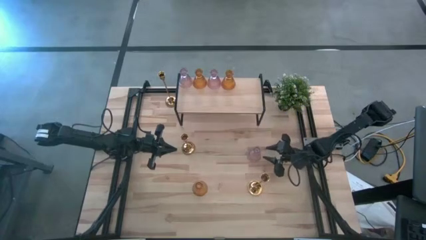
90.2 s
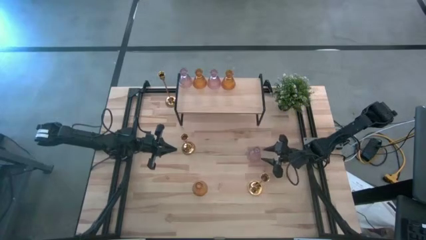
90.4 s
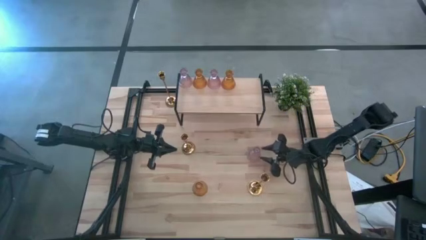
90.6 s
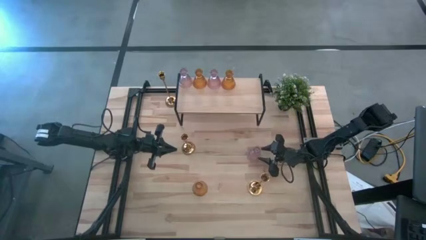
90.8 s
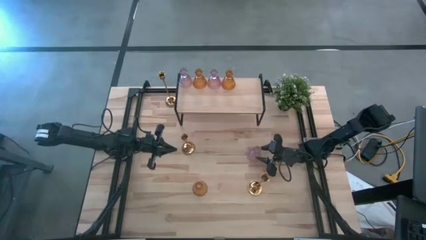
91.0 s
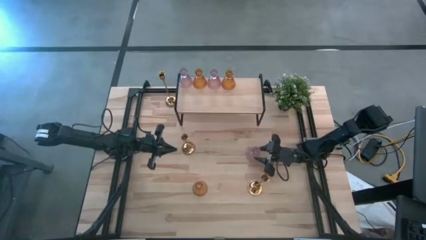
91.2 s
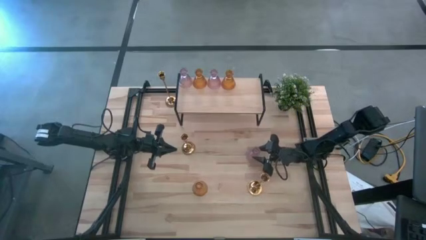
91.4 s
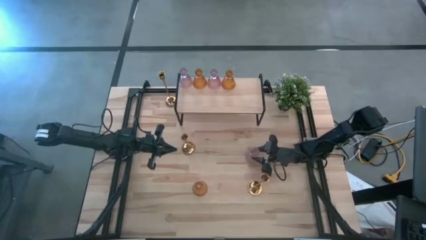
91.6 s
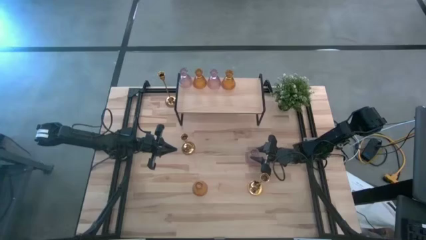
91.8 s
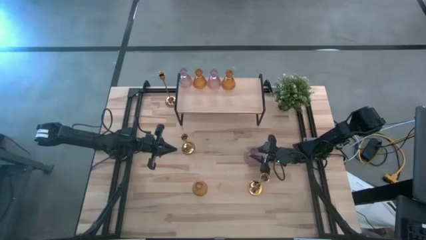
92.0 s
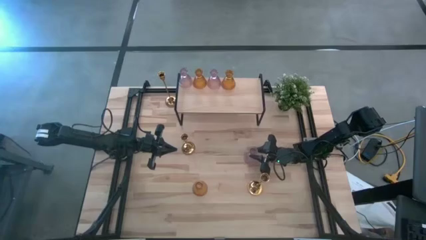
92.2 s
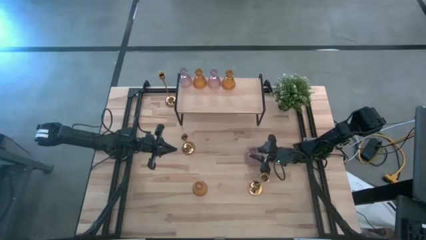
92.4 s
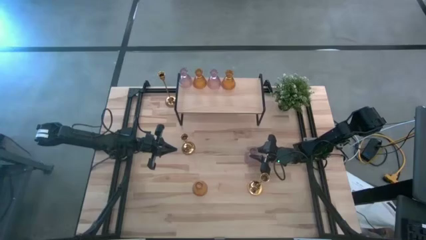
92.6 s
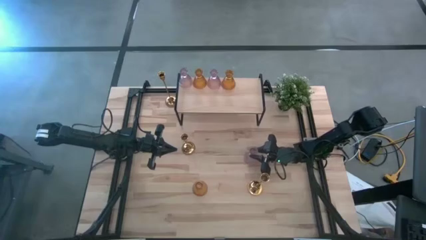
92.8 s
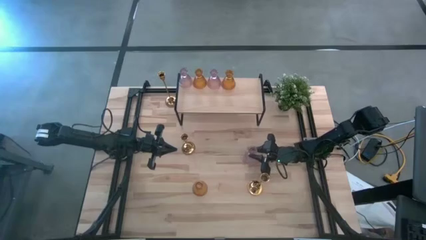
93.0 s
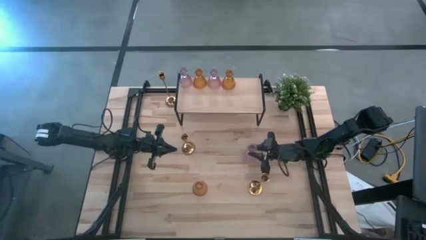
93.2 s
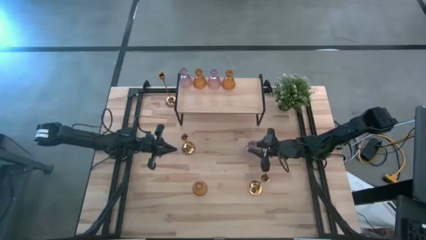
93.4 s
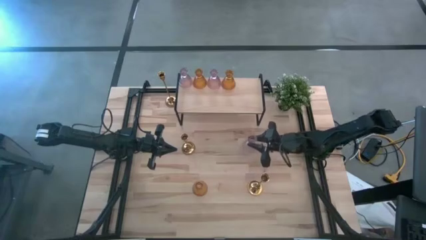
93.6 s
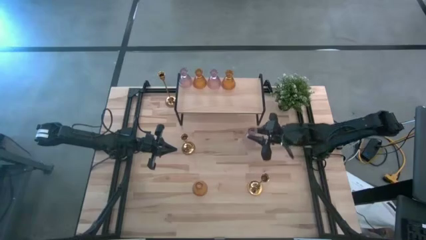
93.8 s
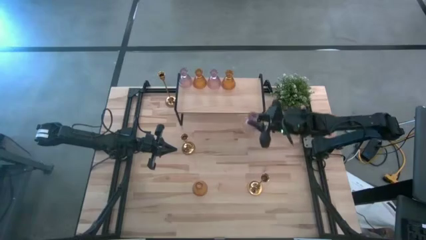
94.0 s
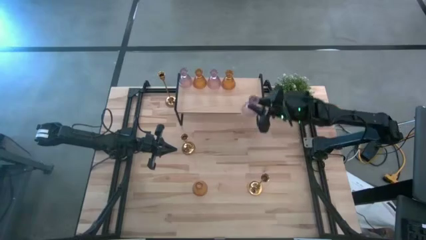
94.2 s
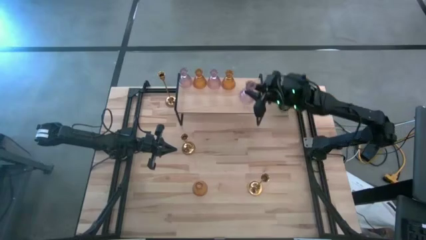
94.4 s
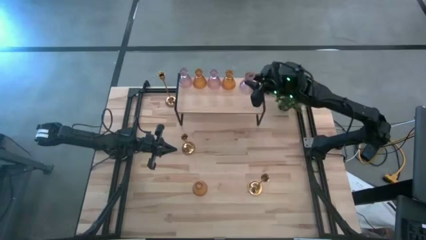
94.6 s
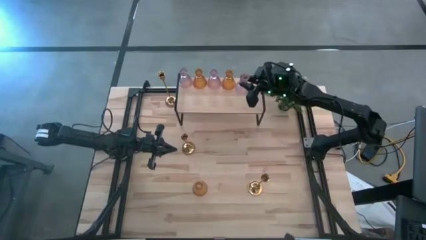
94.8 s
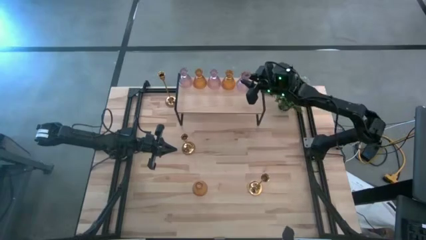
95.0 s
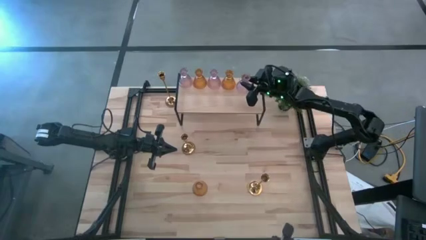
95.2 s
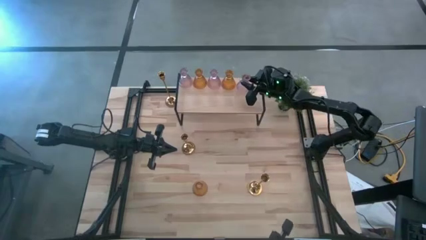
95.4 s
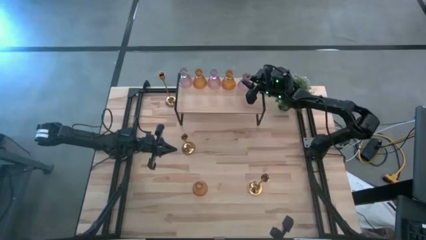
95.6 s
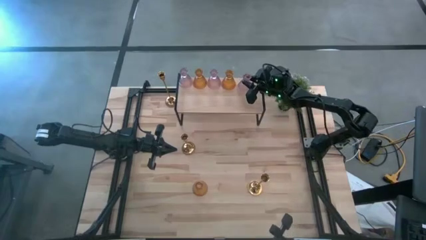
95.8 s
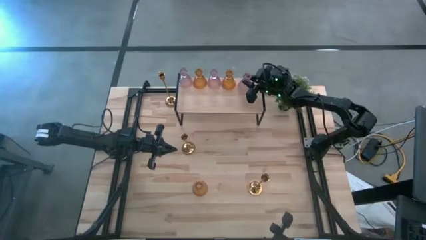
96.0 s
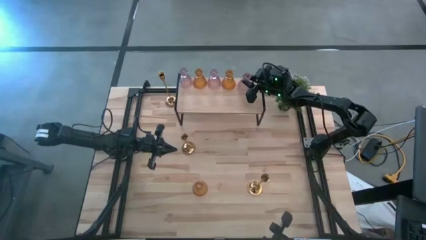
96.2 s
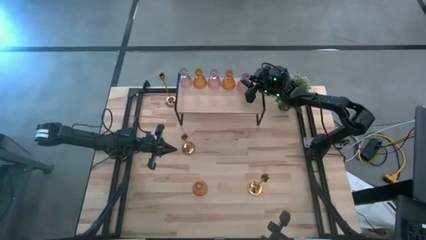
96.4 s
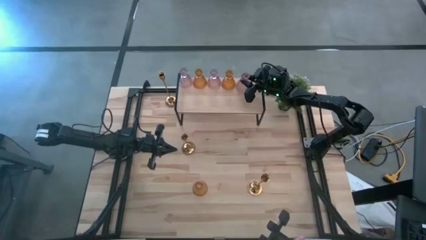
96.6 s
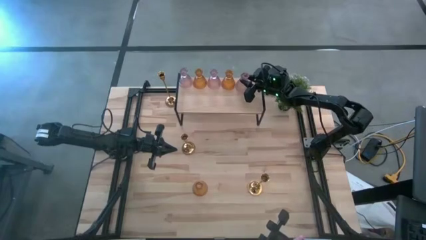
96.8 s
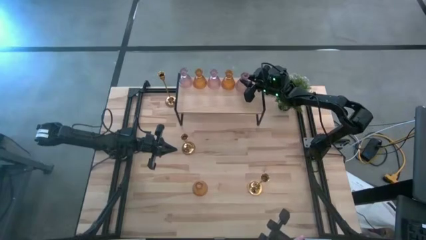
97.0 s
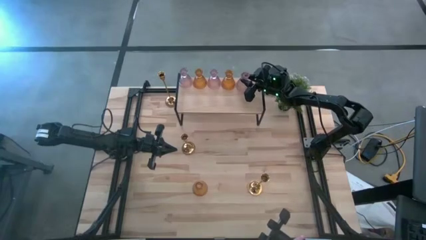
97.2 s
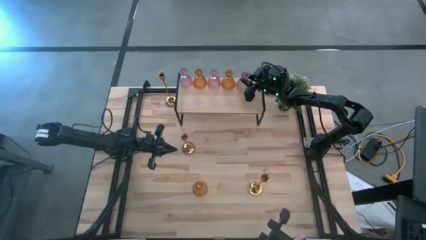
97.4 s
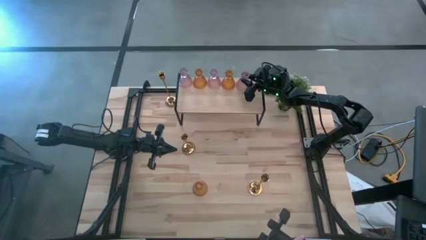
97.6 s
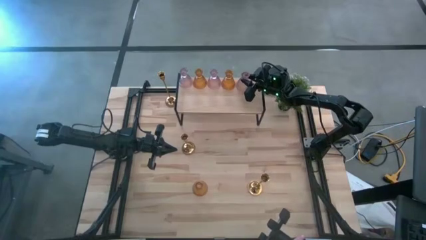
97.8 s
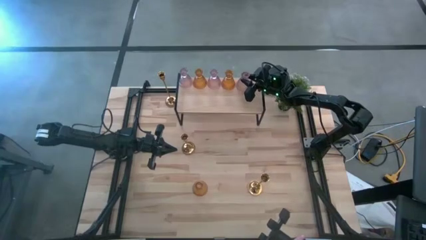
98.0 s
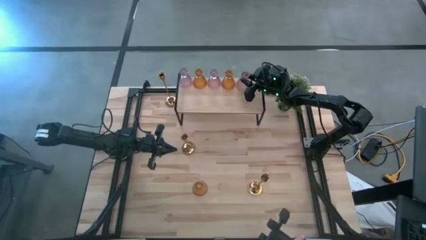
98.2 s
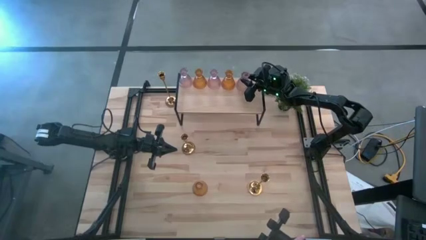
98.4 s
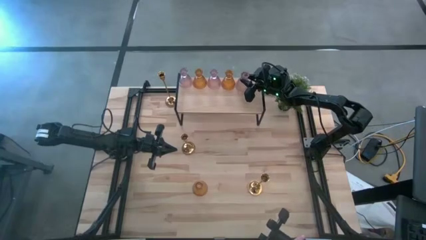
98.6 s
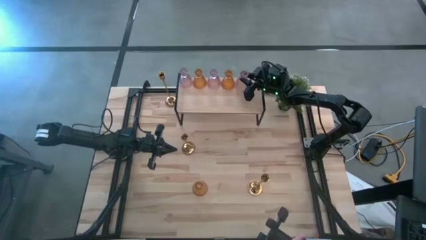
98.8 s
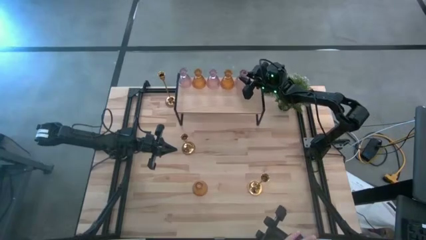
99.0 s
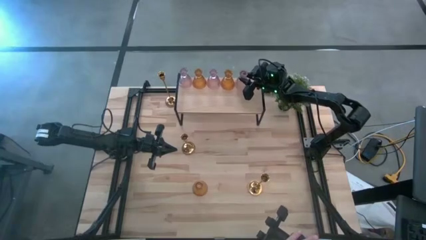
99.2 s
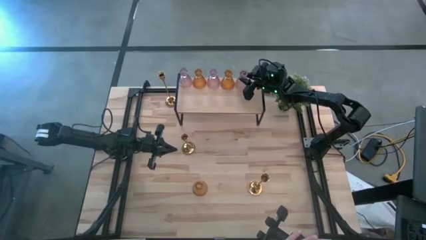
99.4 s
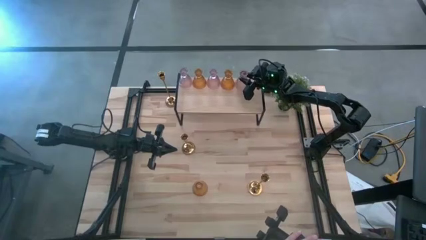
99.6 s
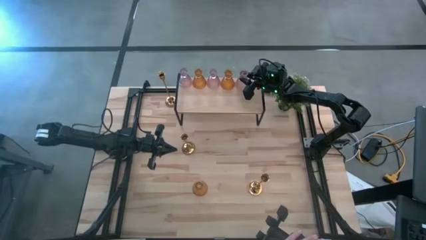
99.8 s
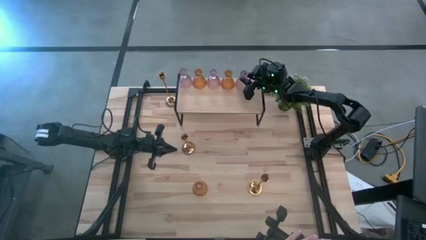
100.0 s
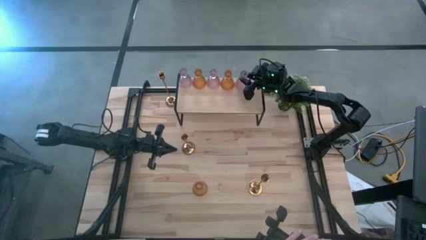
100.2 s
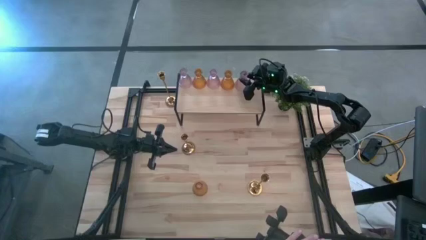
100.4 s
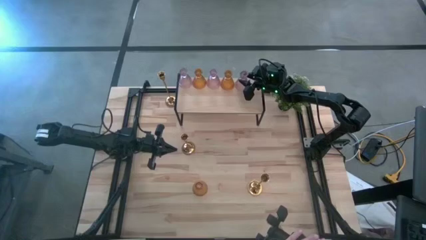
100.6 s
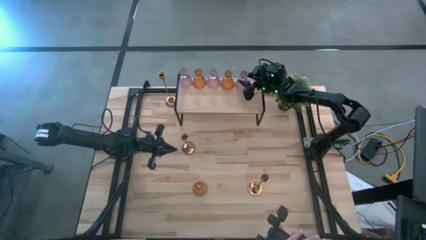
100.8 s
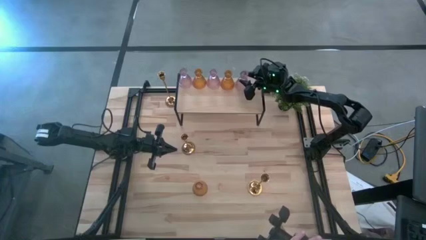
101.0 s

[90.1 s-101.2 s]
Task: Pick & Place candle stick holders
Put the purple glass candle holder on the shelf aligned with the other glass candle holders

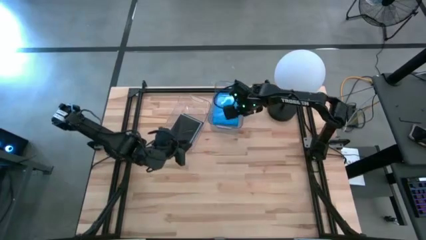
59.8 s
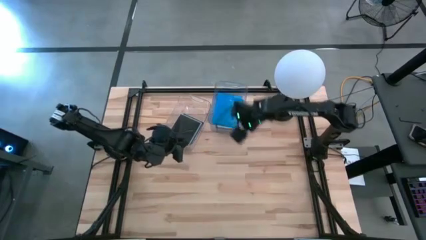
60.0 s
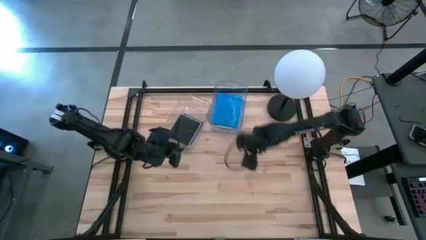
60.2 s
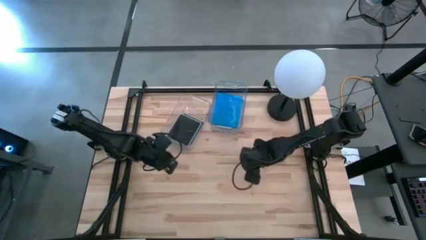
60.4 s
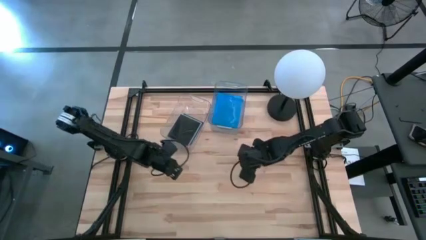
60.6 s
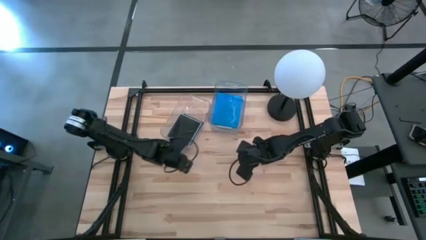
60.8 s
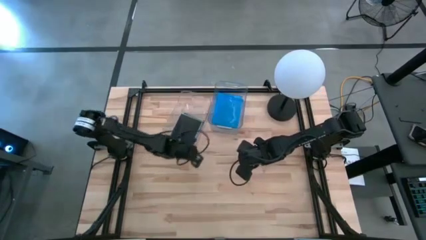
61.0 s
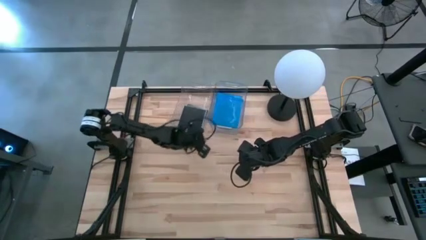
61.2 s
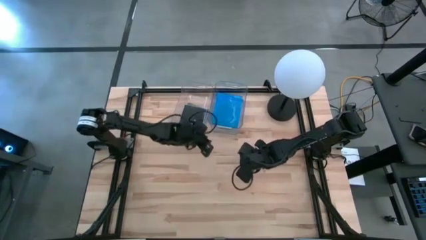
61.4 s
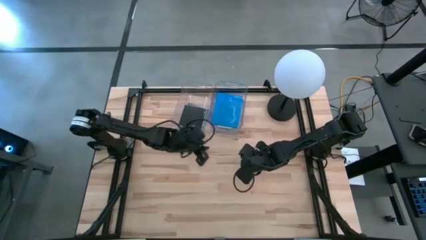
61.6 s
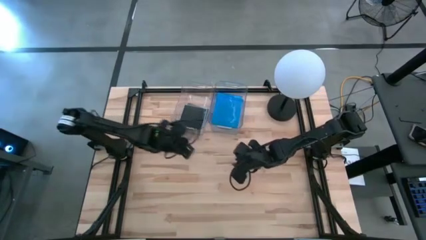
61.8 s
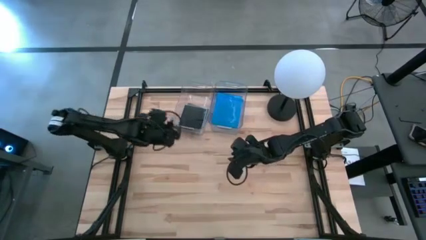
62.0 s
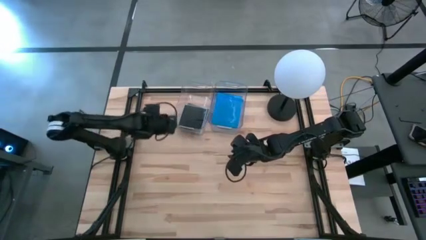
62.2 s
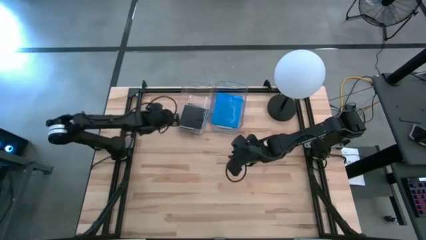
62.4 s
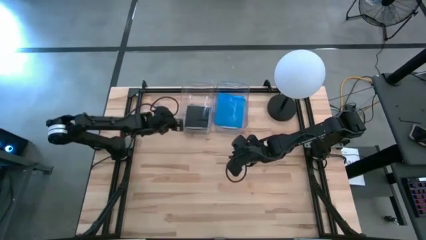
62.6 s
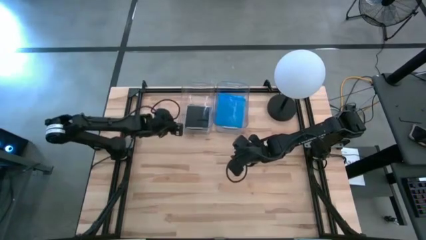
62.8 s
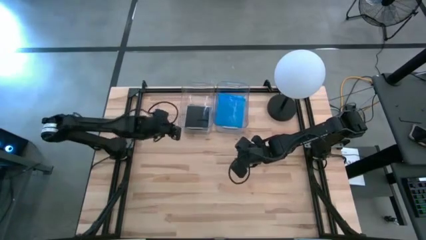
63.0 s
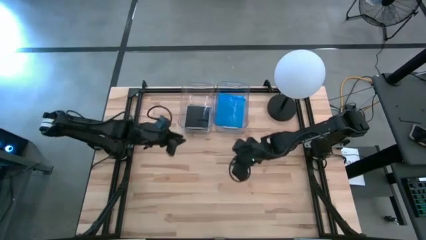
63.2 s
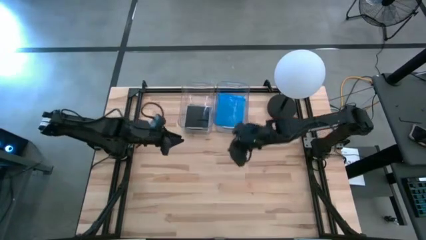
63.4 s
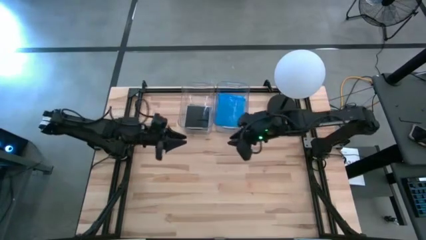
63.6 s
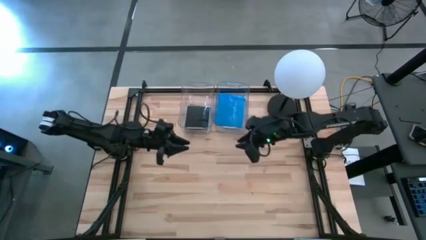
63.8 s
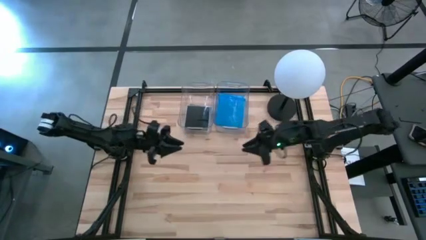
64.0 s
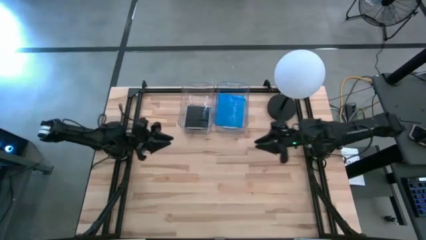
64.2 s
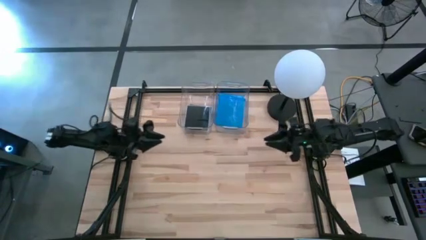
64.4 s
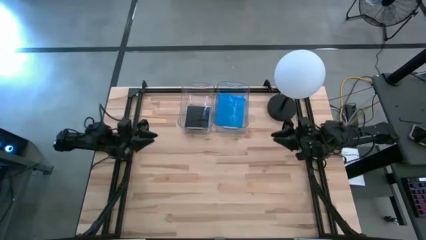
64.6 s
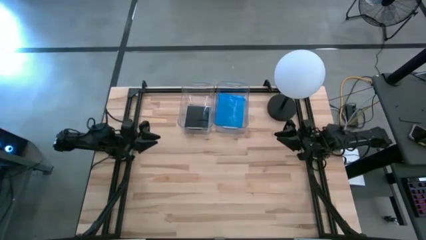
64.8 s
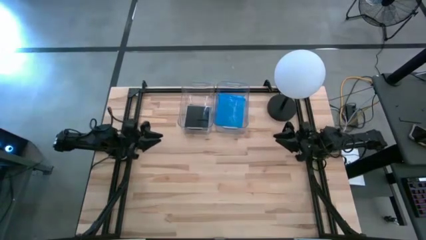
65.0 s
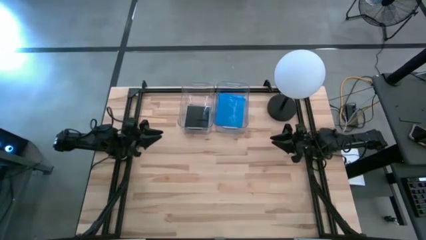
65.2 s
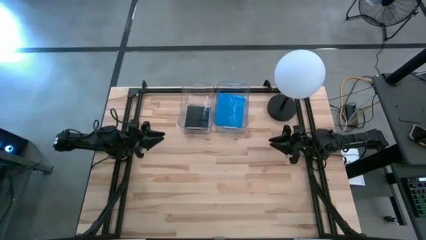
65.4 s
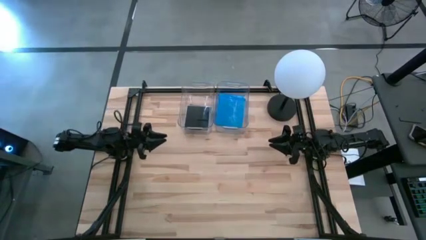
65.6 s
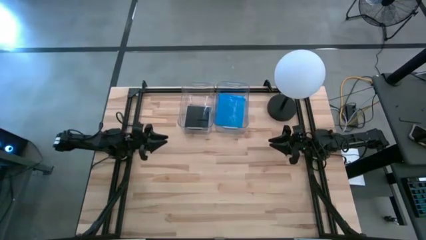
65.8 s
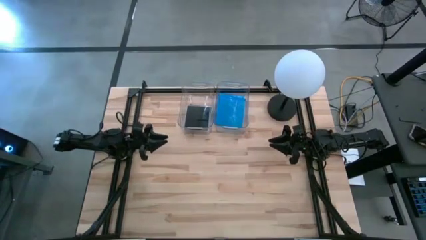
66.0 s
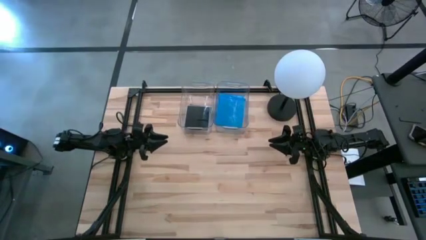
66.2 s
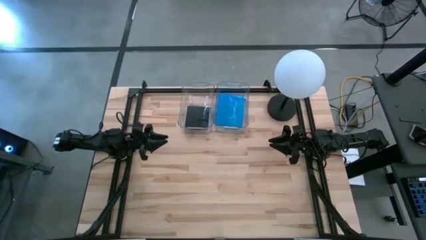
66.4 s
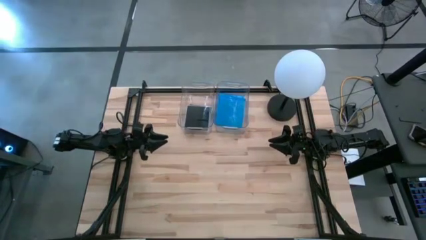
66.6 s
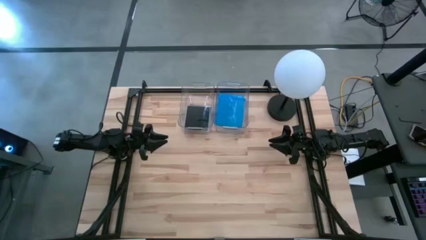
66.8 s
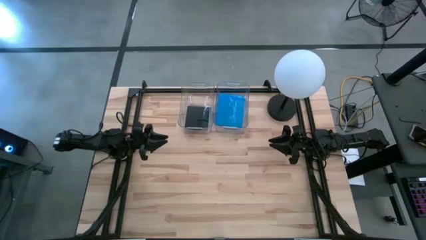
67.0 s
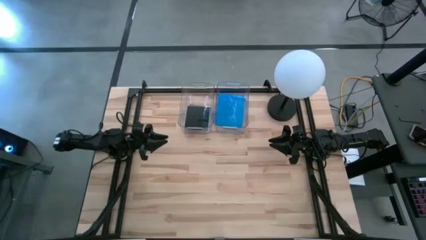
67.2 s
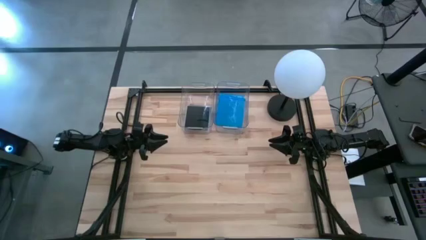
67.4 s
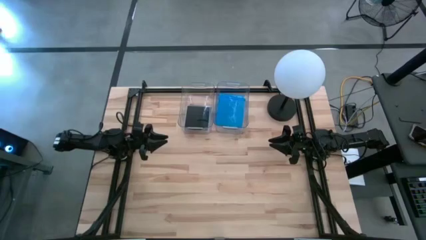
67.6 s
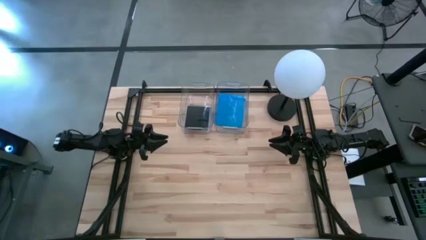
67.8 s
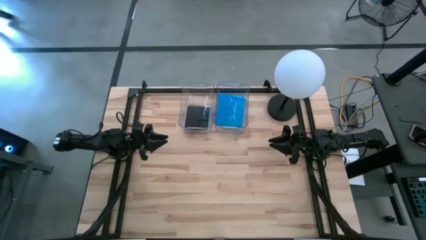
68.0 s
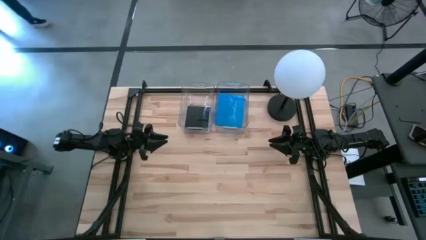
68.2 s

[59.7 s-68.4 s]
Task: Pick & place jewel cases by type
Return to Home Position
